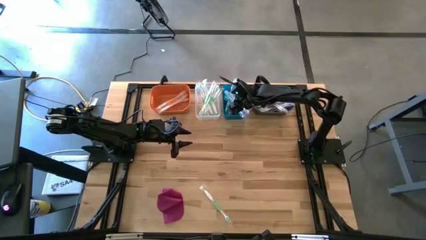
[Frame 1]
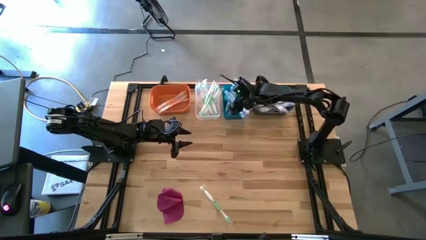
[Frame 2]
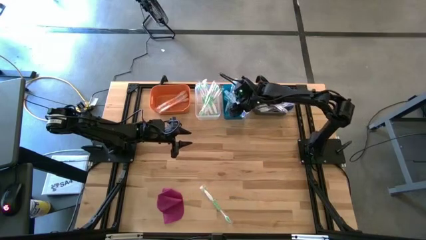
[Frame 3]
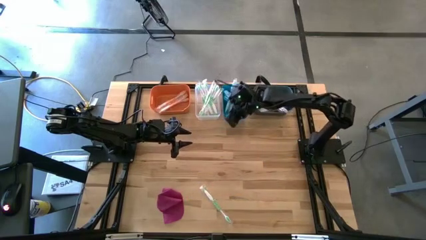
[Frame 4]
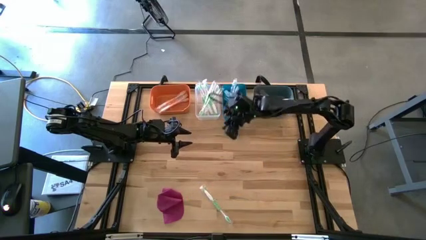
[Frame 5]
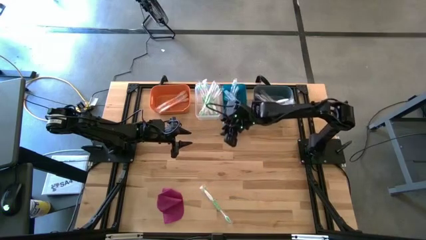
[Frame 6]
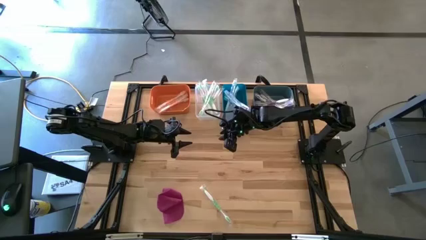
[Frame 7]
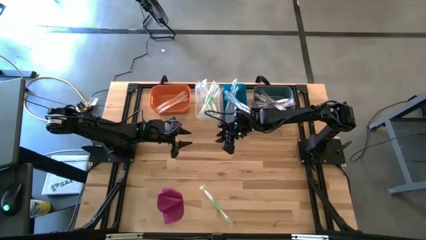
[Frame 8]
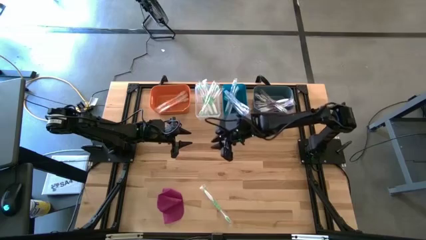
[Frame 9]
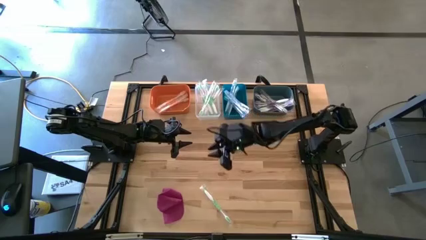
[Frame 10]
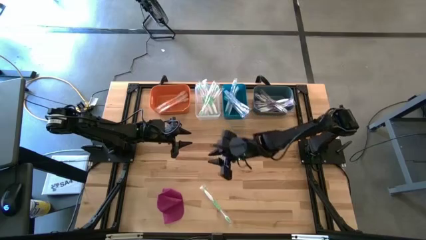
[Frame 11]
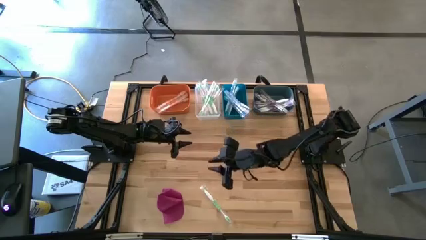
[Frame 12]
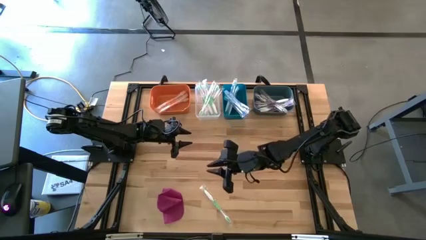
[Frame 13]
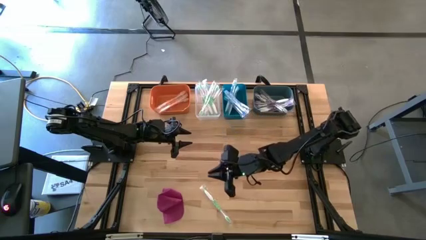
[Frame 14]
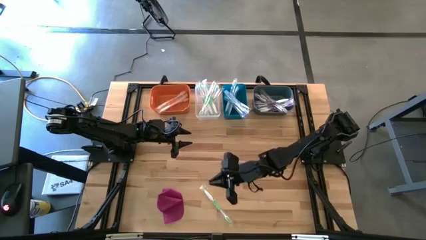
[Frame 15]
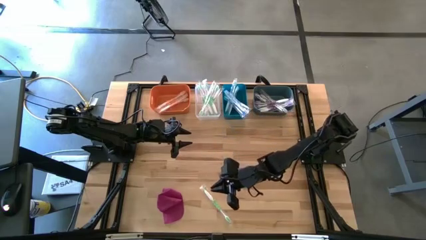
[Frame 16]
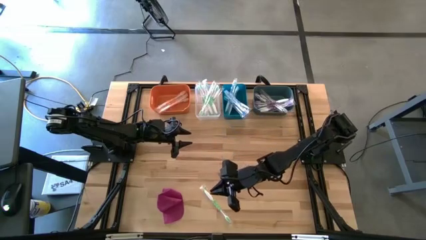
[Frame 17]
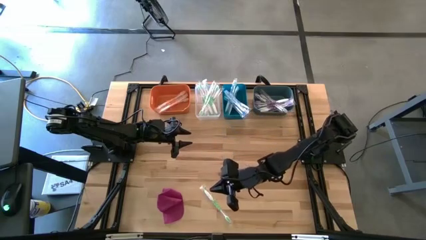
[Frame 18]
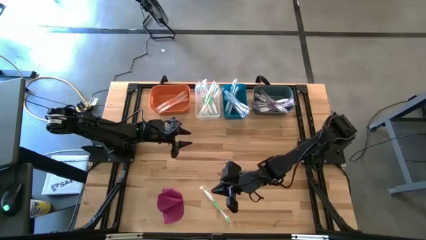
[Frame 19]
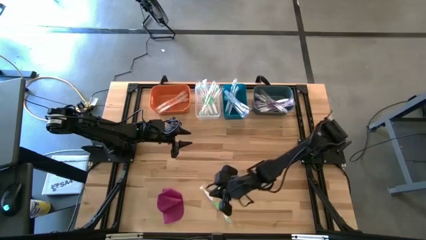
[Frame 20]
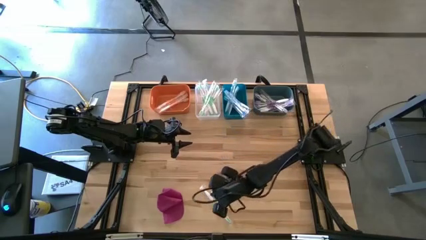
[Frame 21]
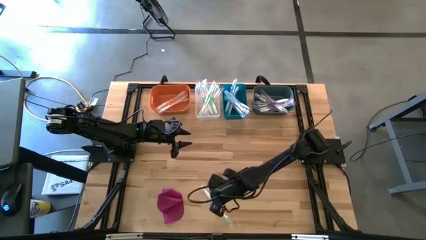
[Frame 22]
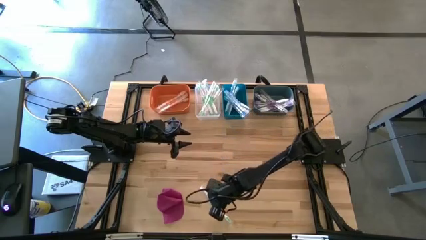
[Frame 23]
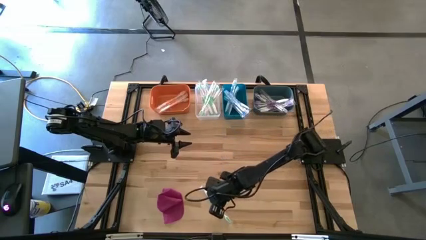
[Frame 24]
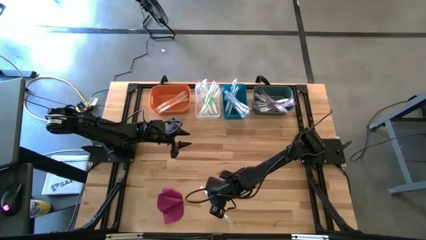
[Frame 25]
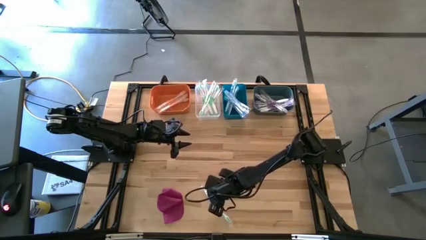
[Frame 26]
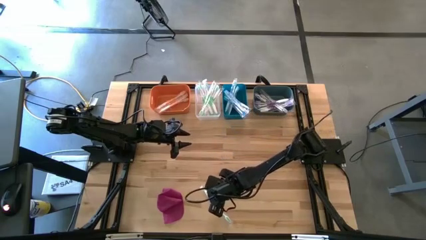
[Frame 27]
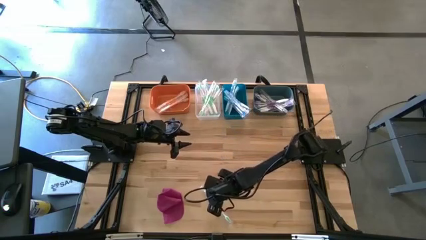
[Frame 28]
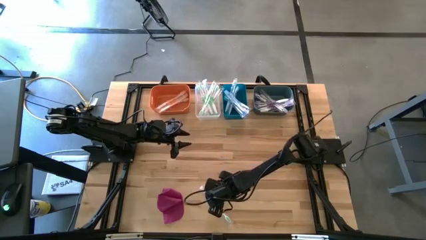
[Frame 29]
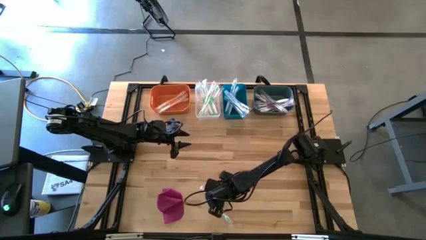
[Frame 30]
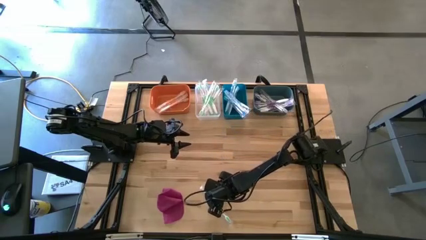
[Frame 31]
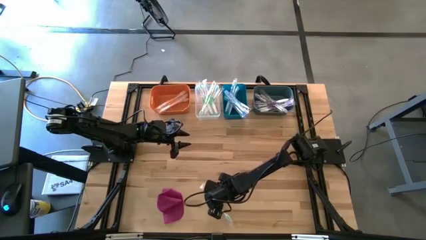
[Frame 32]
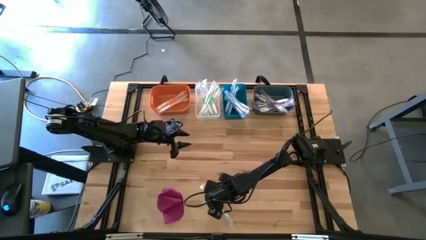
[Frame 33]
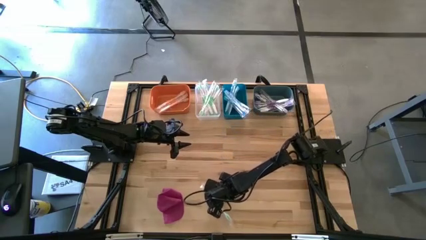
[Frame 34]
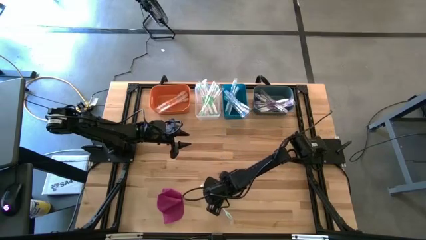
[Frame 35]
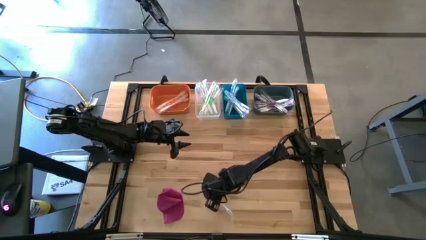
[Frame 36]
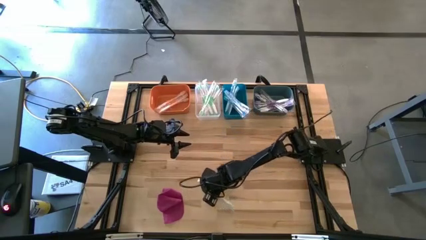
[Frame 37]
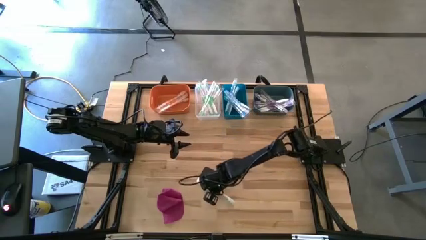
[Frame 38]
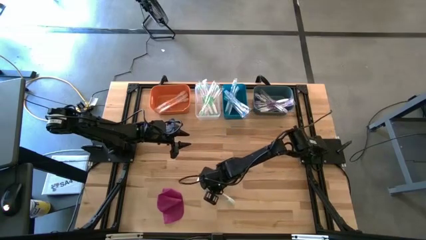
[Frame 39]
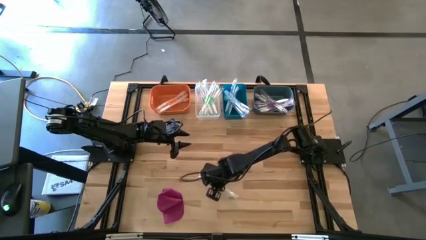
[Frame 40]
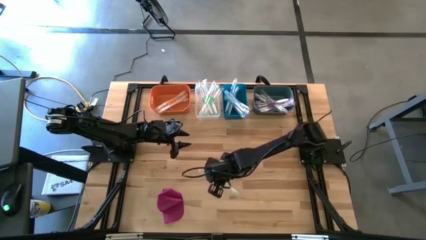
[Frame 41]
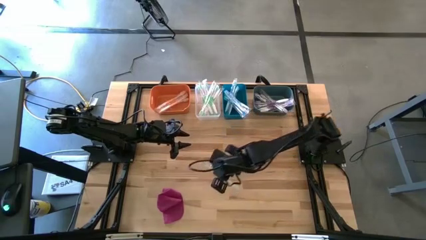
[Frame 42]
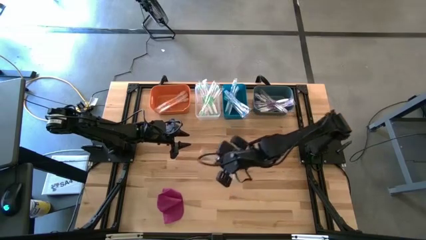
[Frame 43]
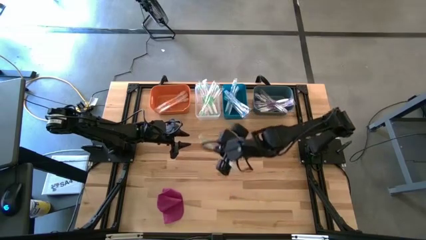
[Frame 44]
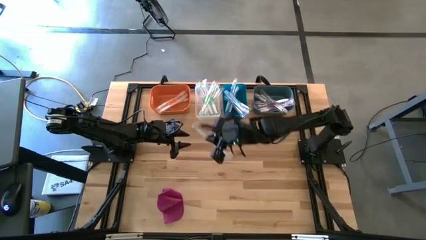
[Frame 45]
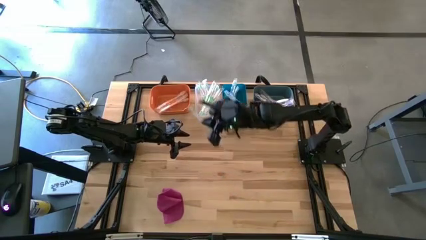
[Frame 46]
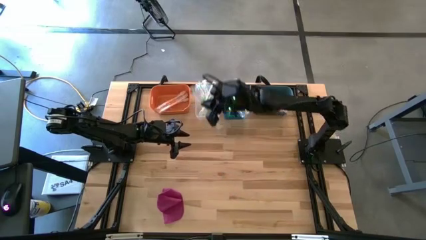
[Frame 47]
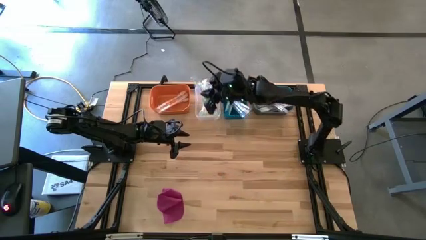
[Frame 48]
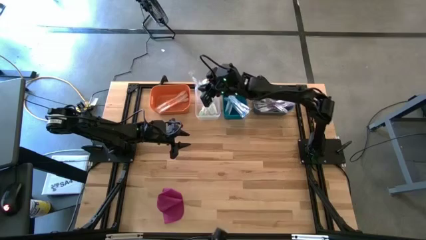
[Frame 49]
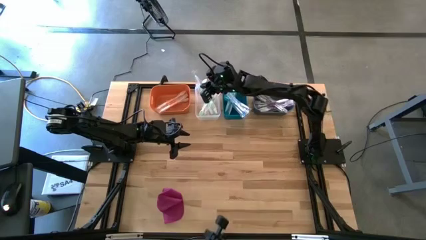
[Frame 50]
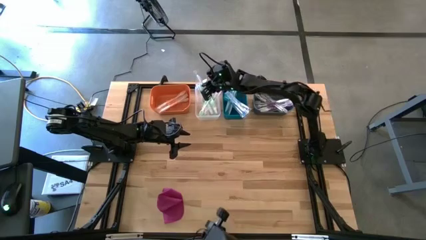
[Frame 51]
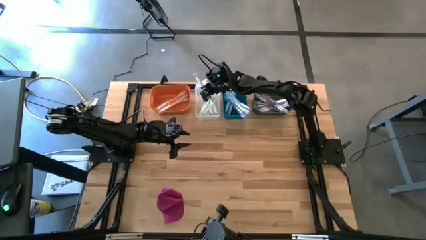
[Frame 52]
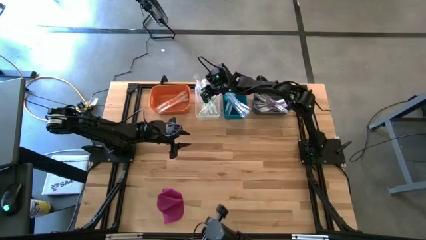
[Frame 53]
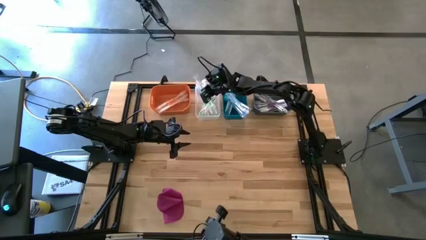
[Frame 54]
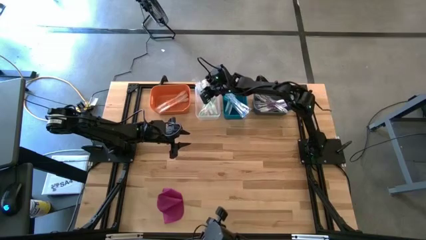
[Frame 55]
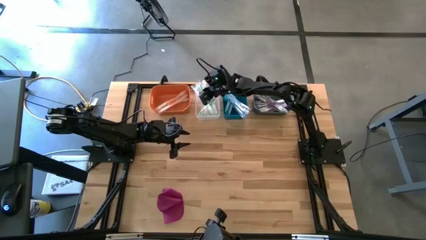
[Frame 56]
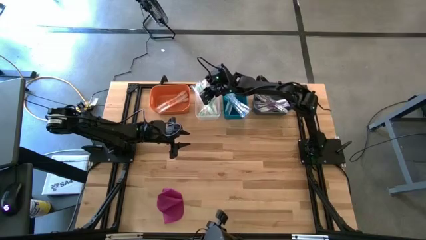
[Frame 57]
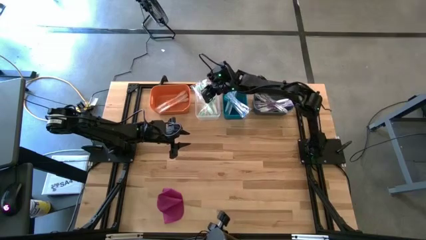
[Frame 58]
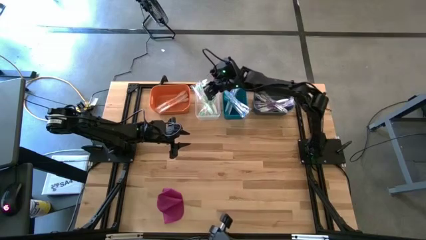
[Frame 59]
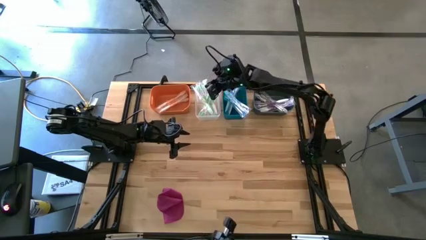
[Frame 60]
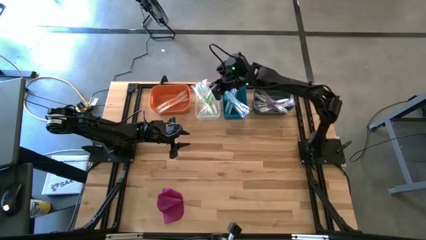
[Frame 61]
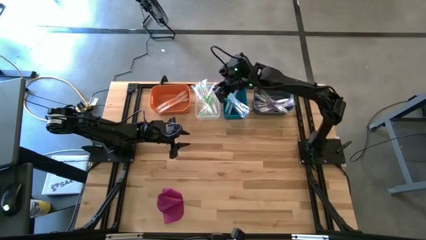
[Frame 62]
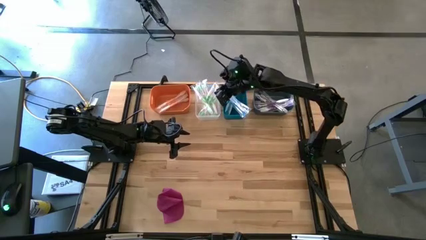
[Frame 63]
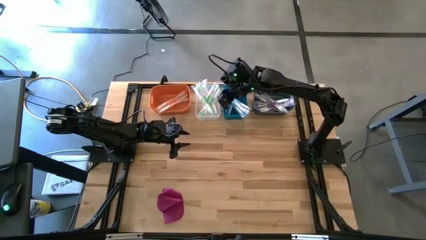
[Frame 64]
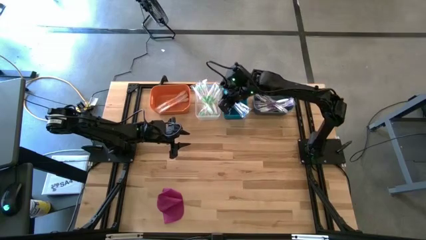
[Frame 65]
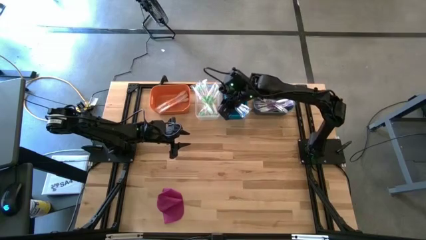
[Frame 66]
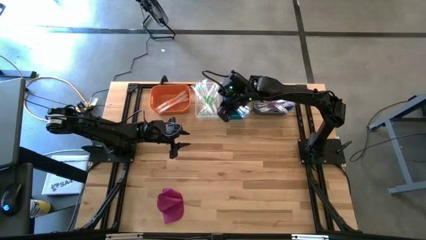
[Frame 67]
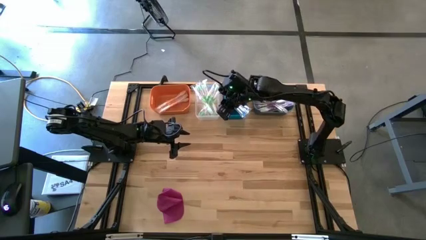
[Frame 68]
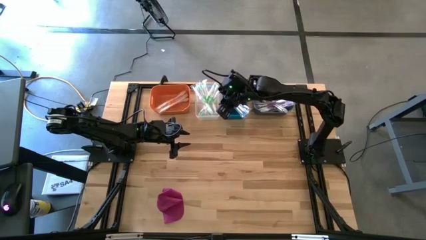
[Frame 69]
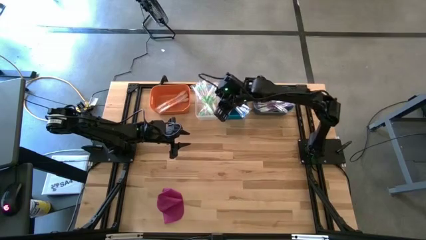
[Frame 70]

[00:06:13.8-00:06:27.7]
Task: Pick & Place Toothbrushes
Put the green toothbrush into the transparent bin
